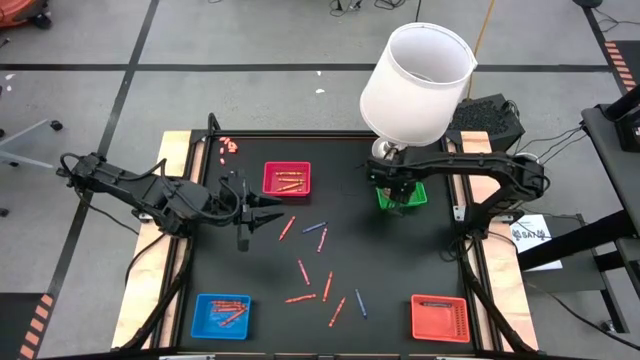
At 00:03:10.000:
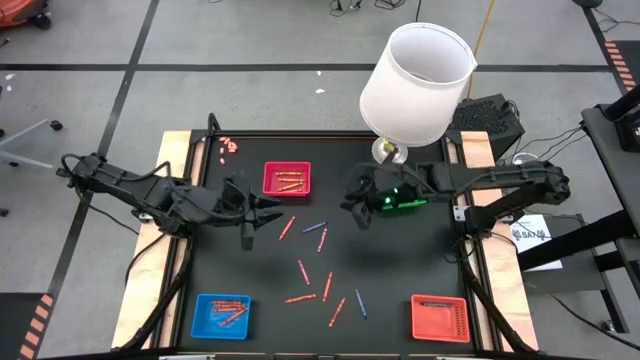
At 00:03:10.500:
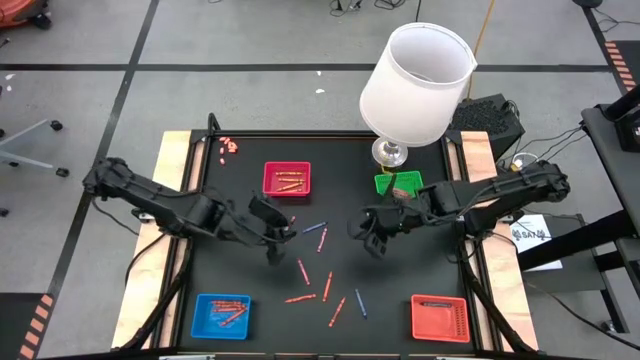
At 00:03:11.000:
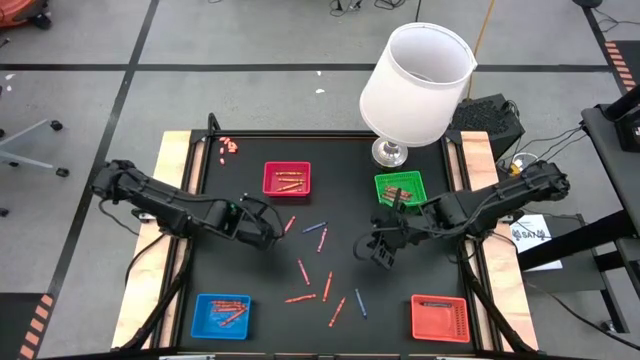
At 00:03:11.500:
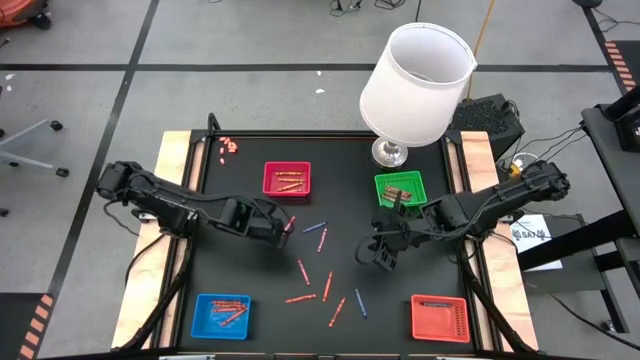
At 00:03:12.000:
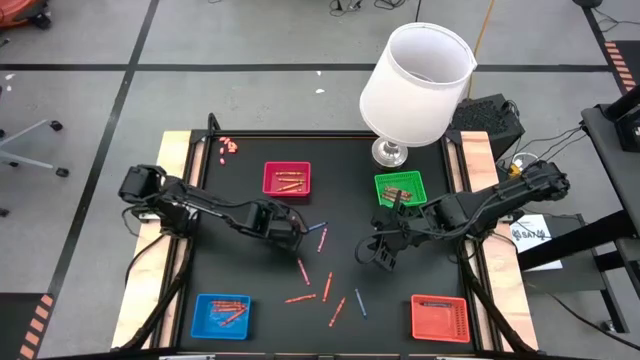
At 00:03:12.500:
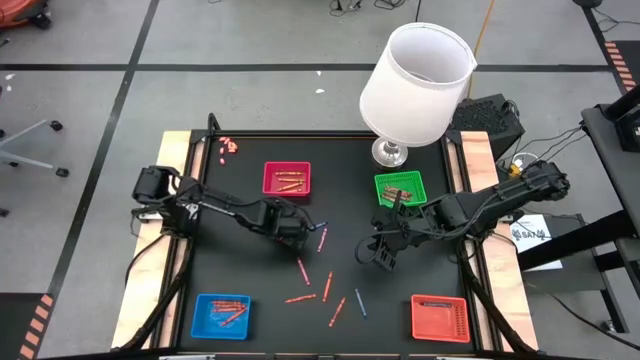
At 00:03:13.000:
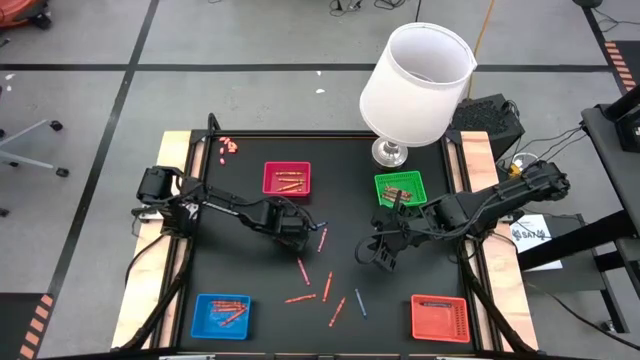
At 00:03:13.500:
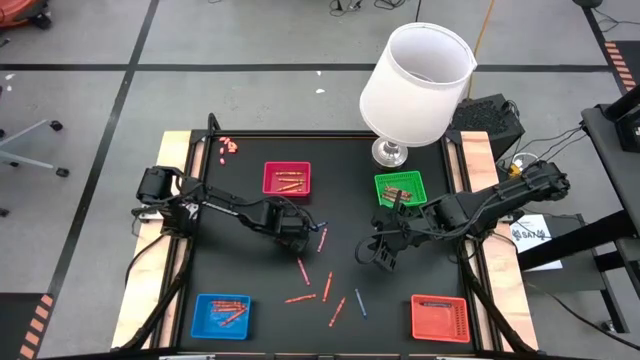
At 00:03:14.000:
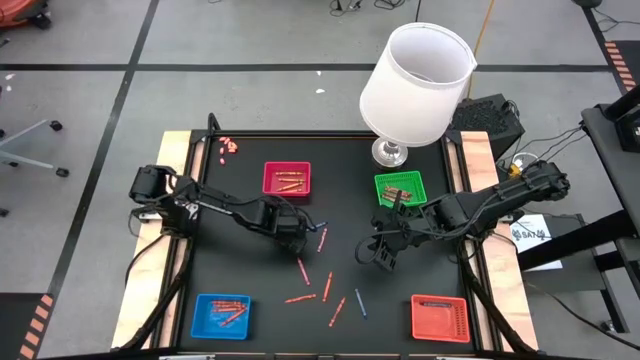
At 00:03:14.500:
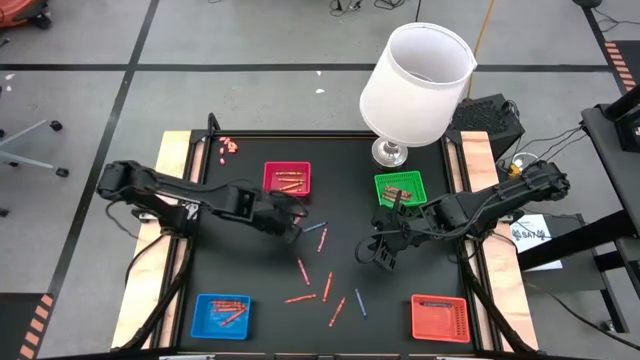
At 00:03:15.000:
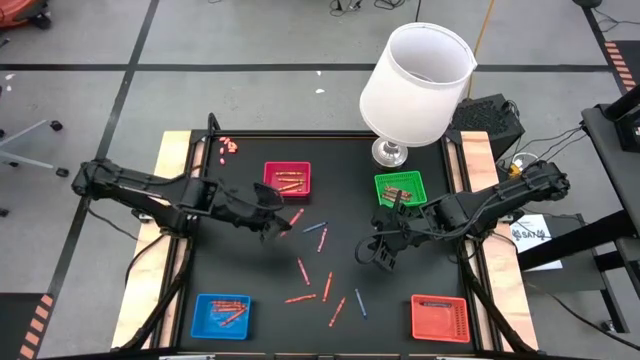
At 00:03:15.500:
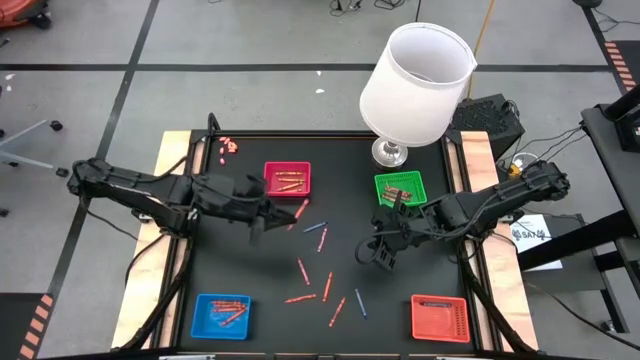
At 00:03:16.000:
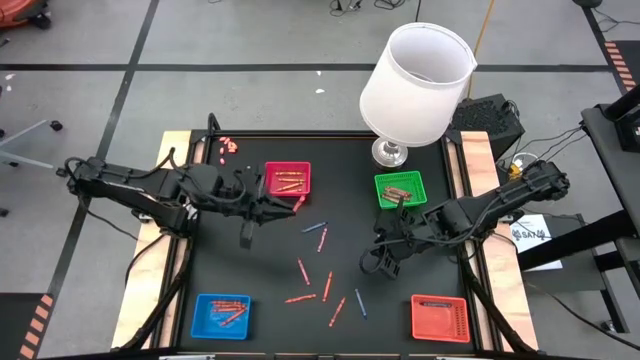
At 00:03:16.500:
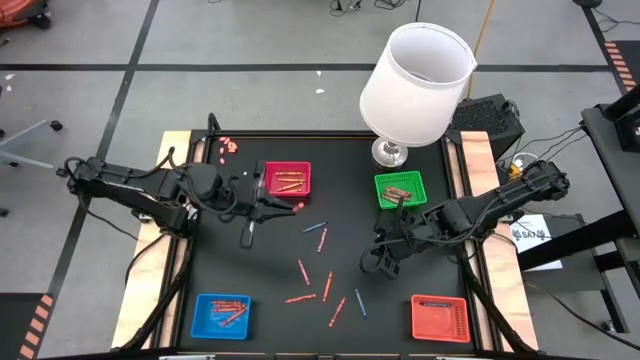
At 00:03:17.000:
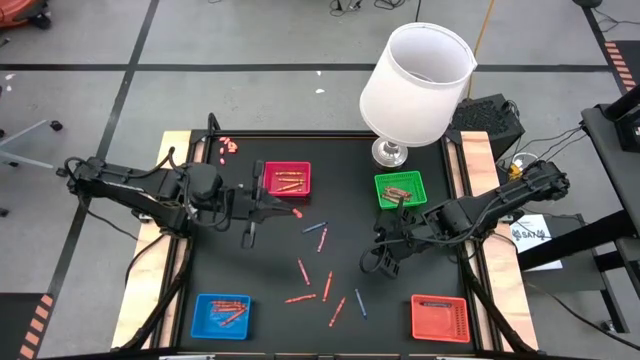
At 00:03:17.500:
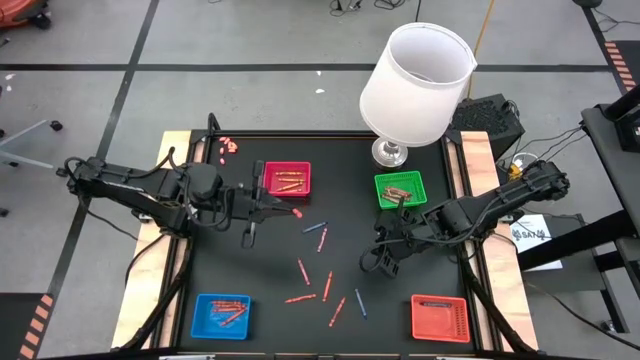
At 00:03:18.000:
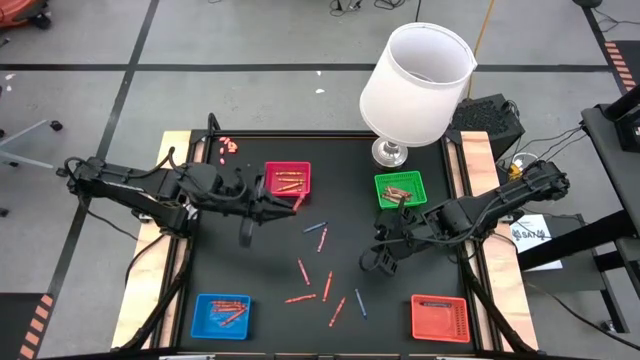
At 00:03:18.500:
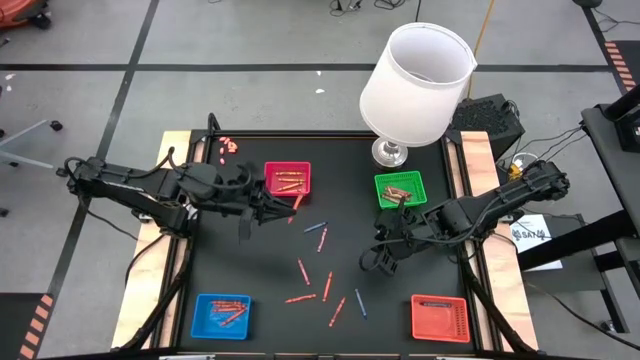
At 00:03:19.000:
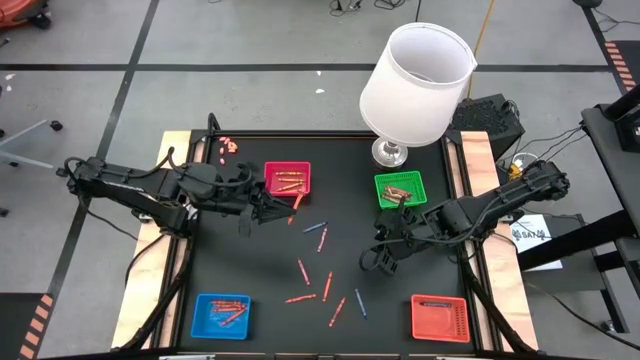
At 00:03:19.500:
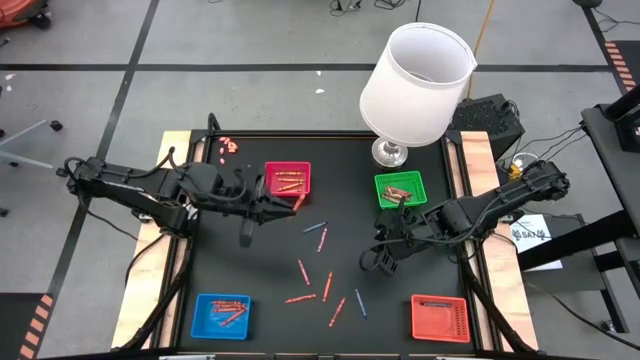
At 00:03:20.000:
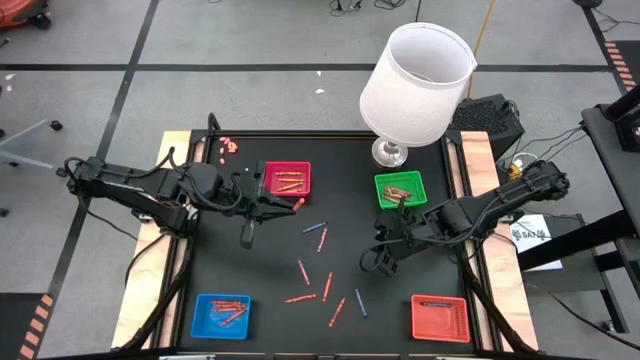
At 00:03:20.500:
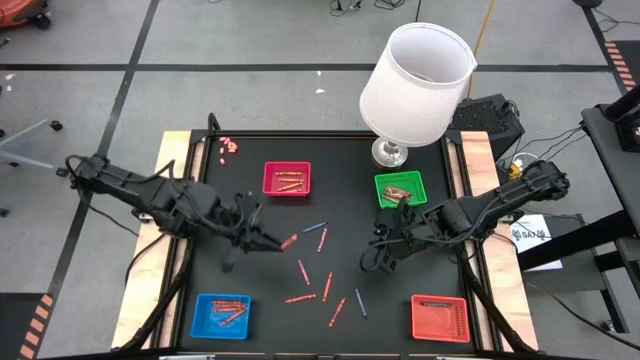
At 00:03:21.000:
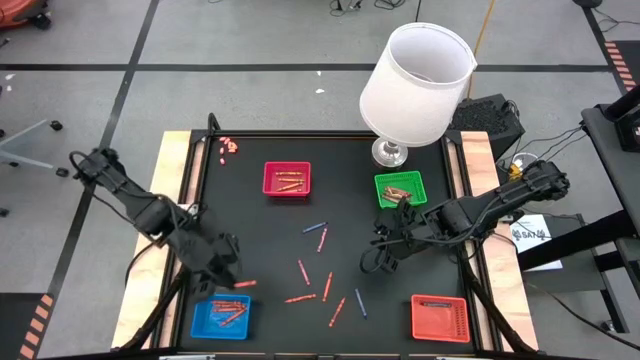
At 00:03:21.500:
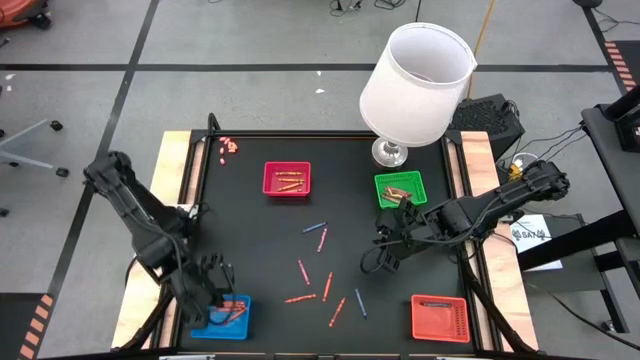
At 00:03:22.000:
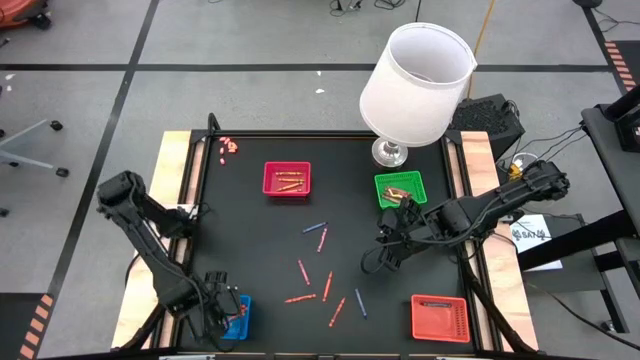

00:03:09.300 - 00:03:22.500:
Task: Sort crayons
Put the orange crayon into the blue basket

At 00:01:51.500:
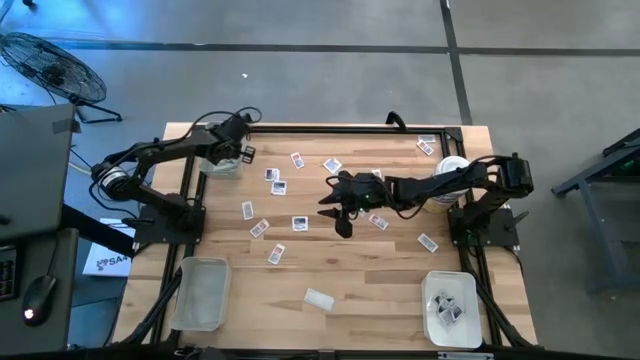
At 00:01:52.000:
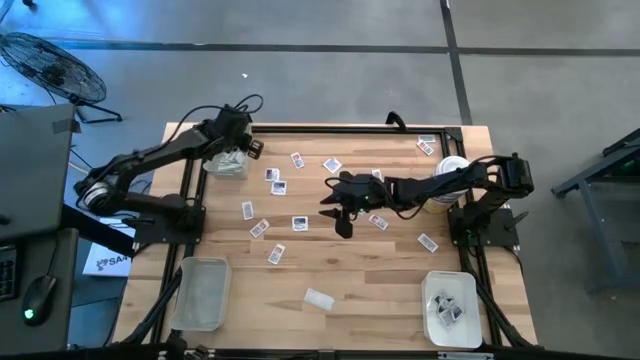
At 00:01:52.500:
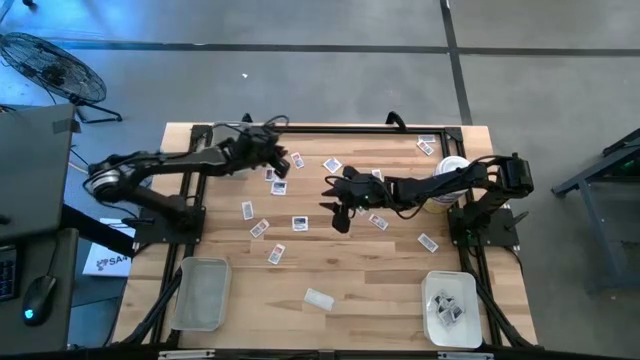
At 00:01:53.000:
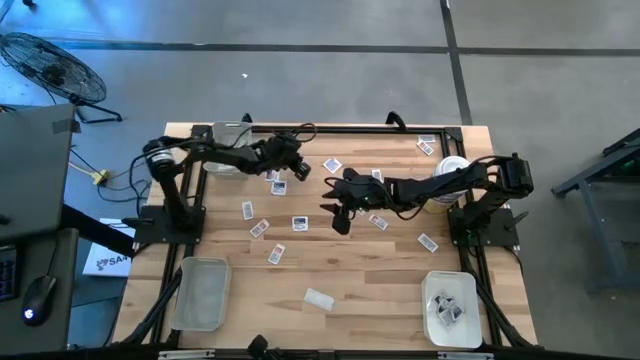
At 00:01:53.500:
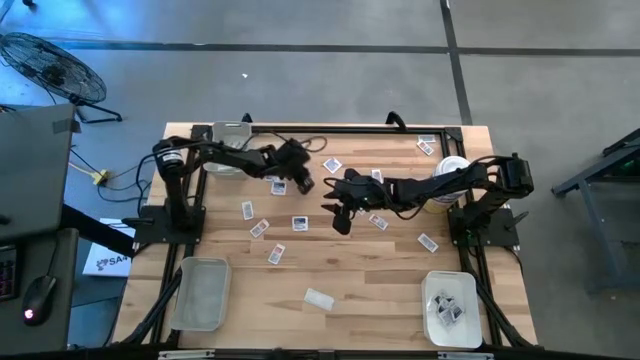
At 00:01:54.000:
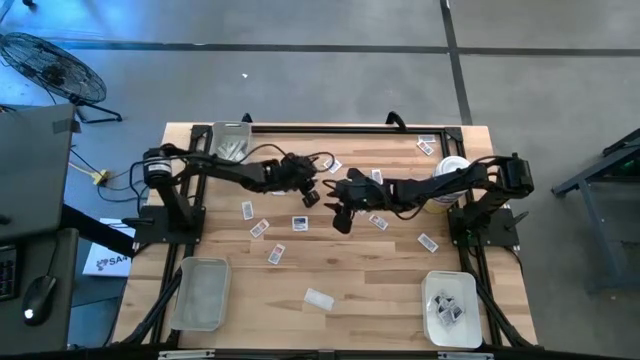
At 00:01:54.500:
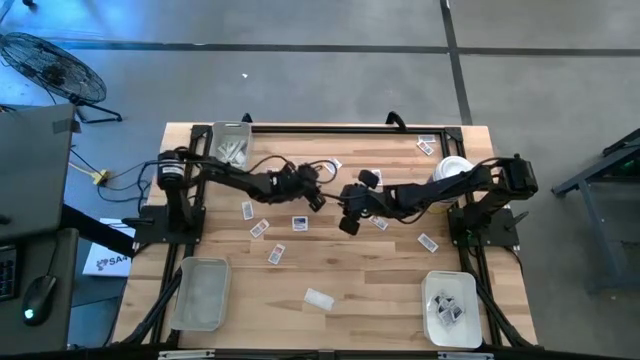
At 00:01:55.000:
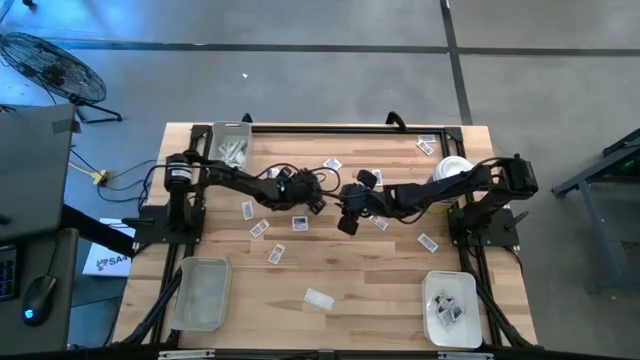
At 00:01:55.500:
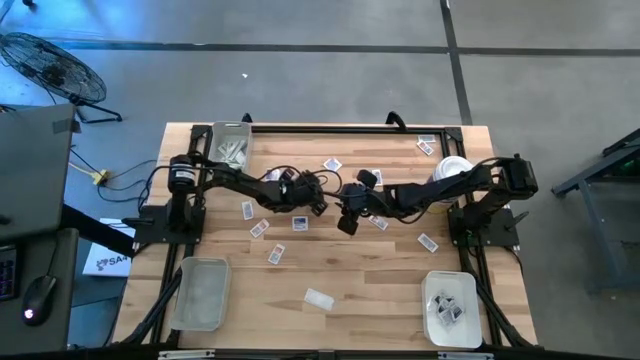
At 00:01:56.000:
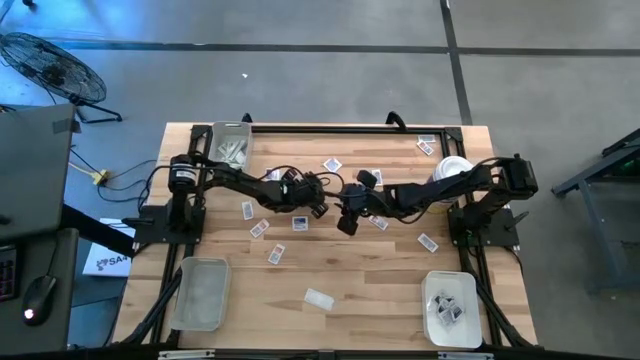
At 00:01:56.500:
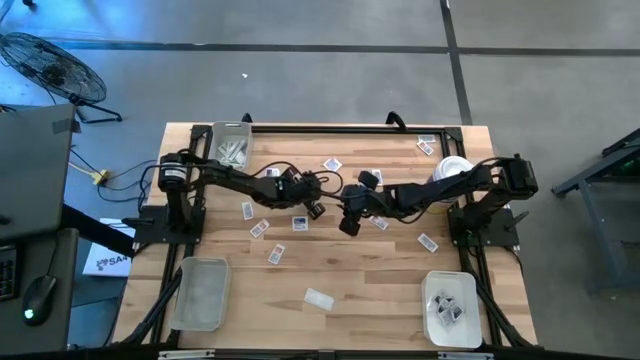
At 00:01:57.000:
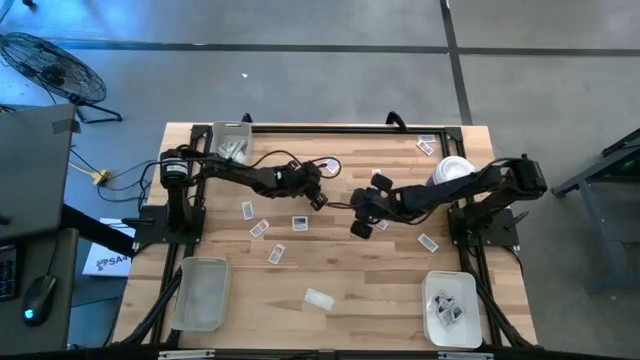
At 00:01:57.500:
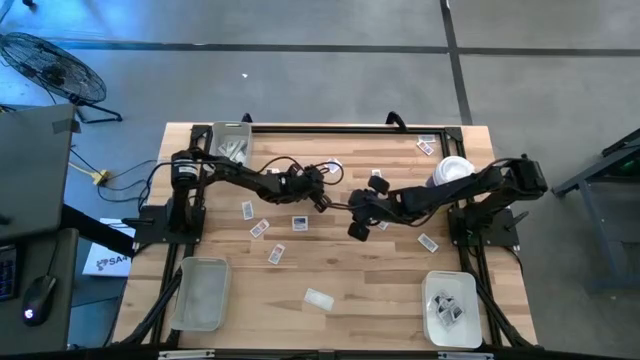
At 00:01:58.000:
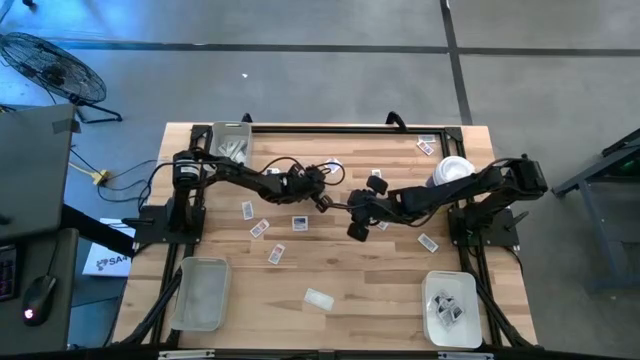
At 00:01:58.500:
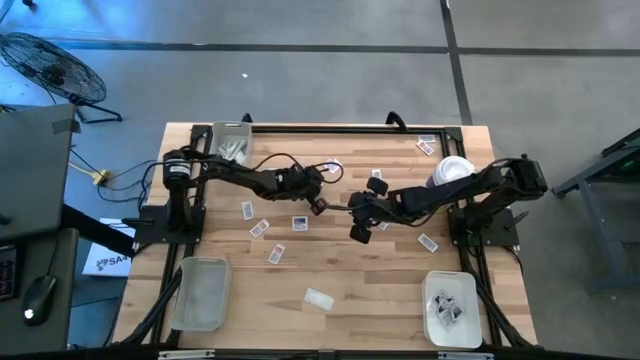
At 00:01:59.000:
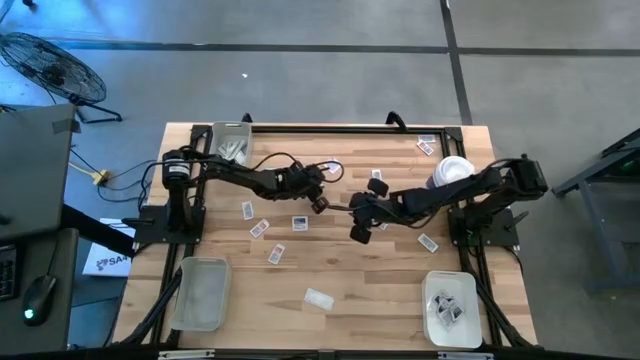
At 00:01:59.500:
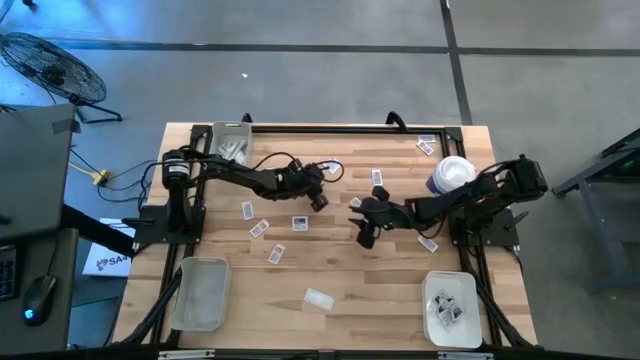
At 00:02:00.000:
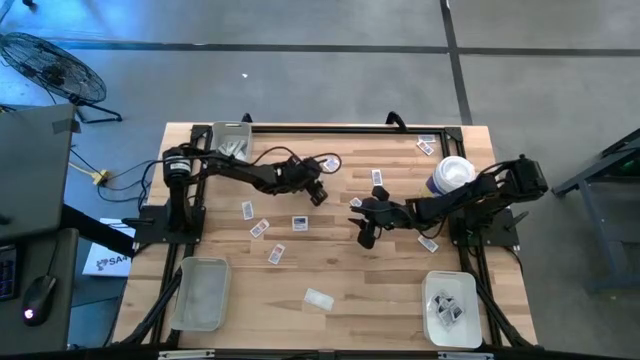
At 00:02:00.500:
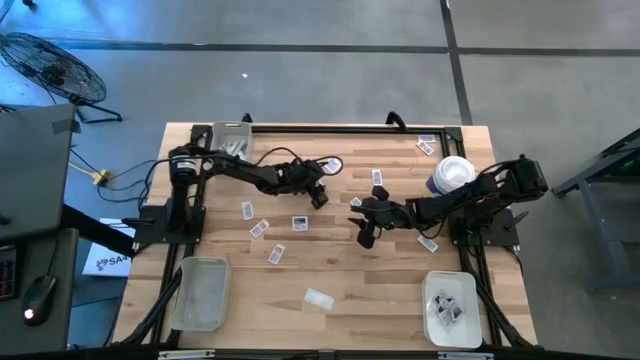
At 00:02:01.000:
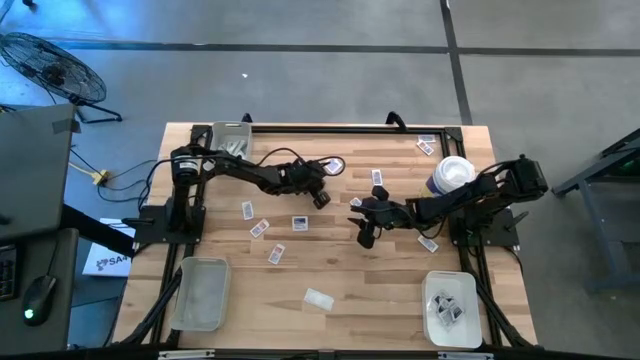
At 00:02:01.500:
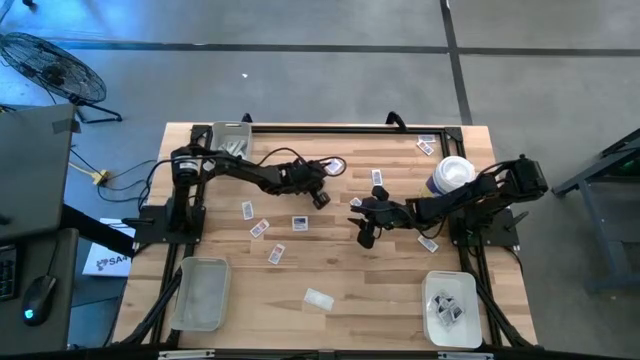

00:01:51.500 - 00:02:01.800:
Task: Pick & Place First Aid Supplies
Put the orange ointment pack into the bottom gray bin
